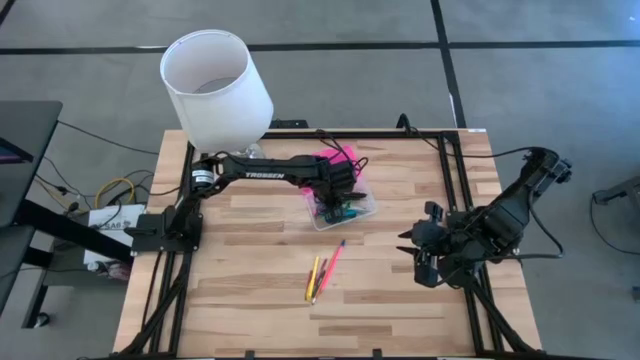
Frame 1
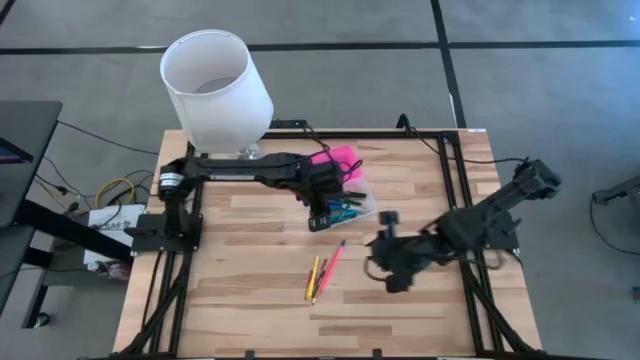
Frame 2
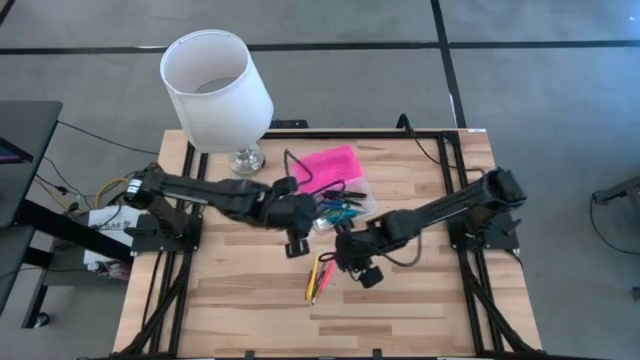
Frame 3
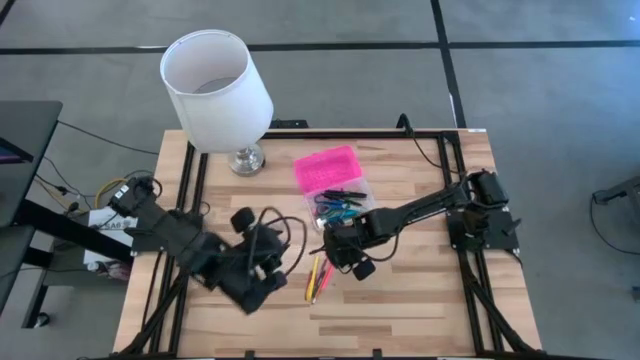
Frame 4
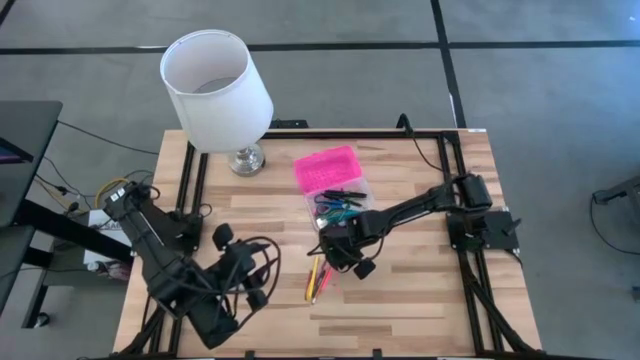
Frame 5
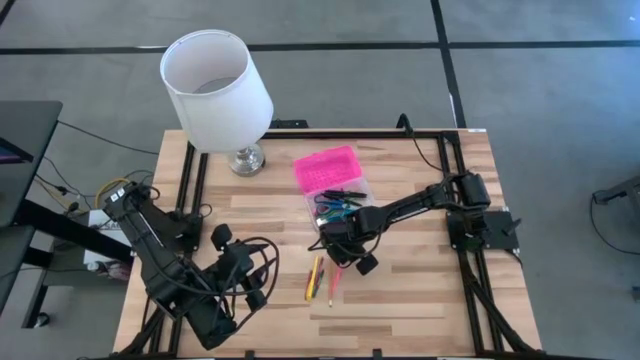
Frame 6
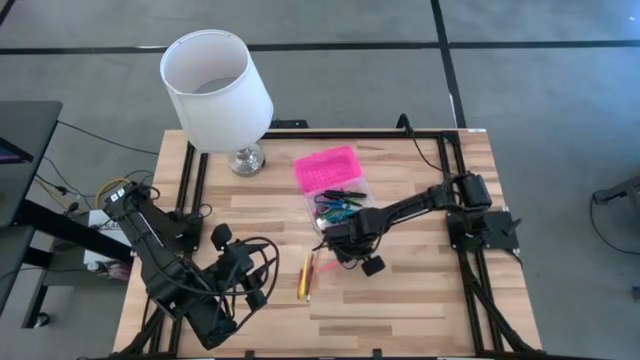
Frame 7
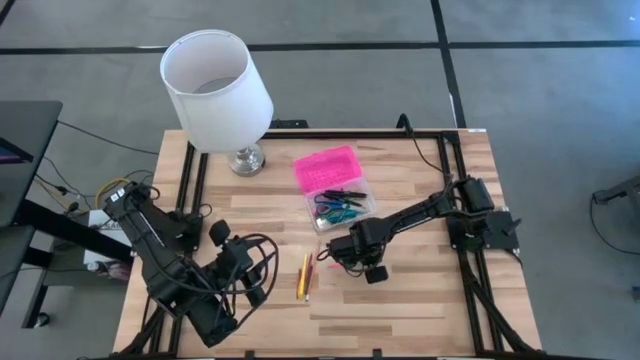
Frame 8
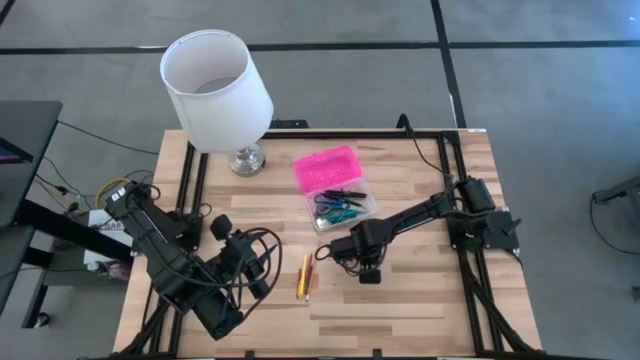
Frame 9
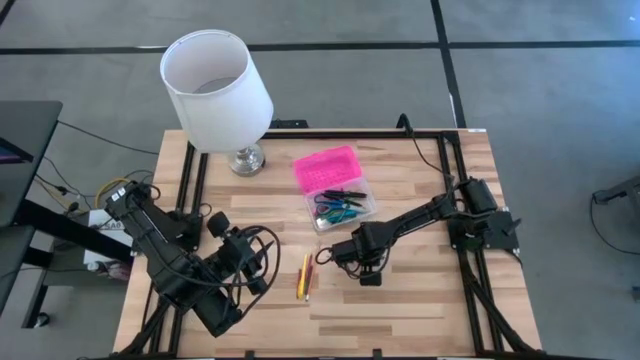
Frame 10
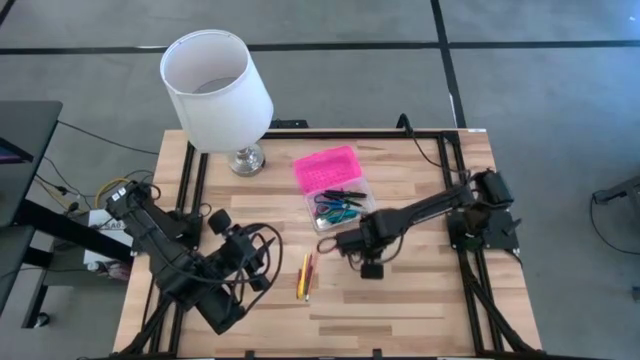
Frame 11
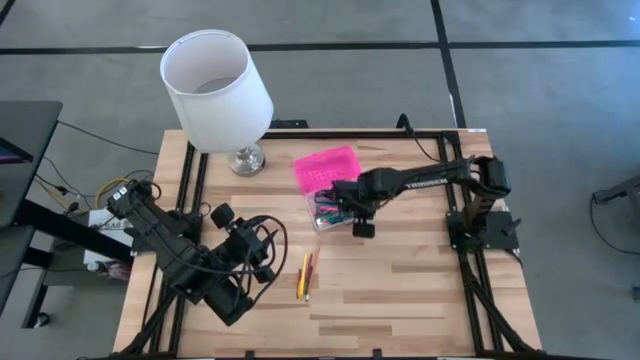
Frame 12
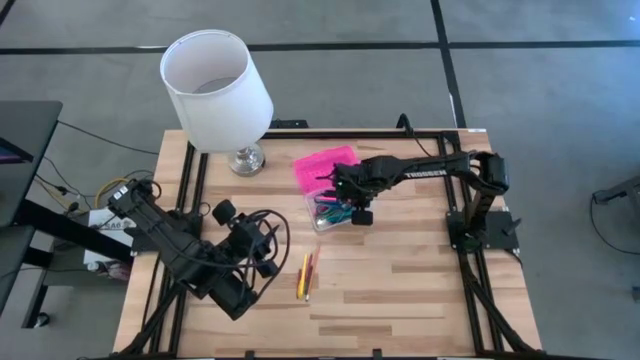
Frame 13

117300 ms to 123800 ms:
Task: Pick & place school supplies into a supply box
Put the pink pencil into the pink supply box

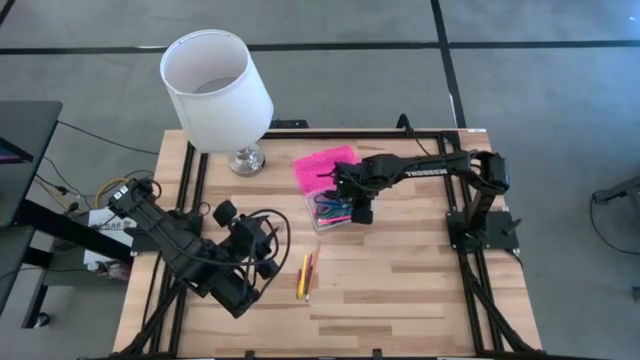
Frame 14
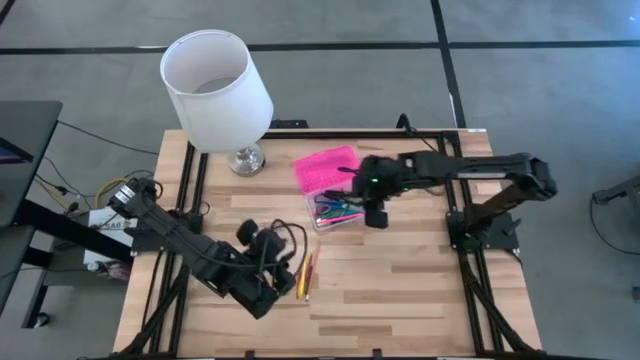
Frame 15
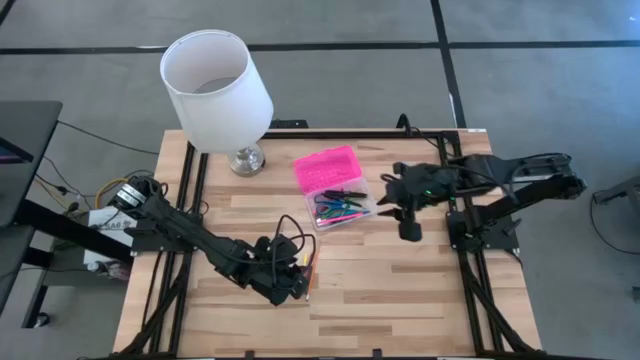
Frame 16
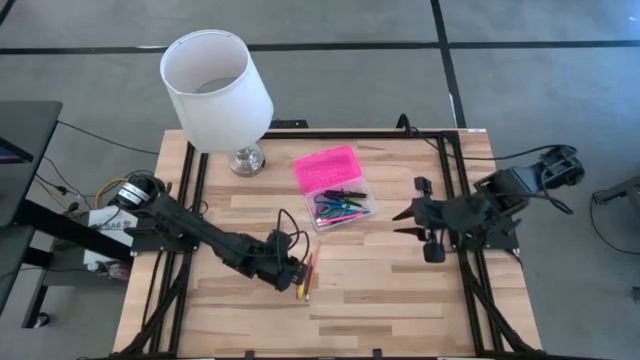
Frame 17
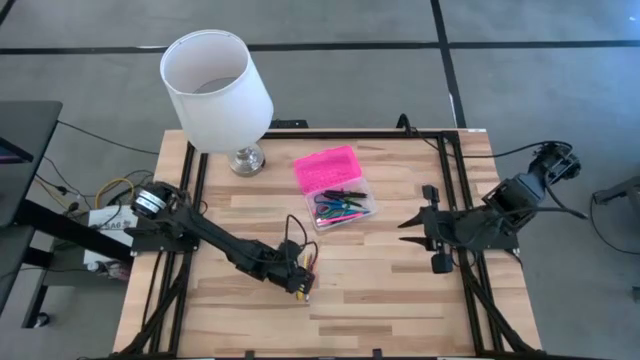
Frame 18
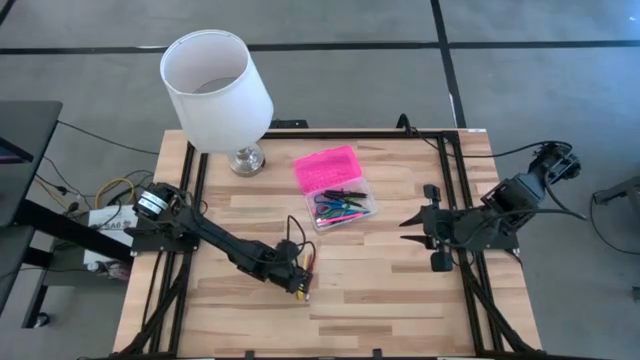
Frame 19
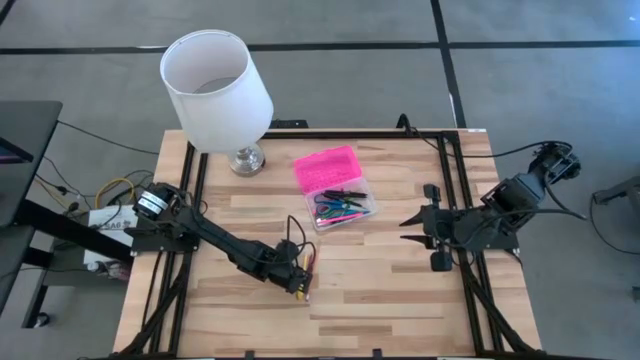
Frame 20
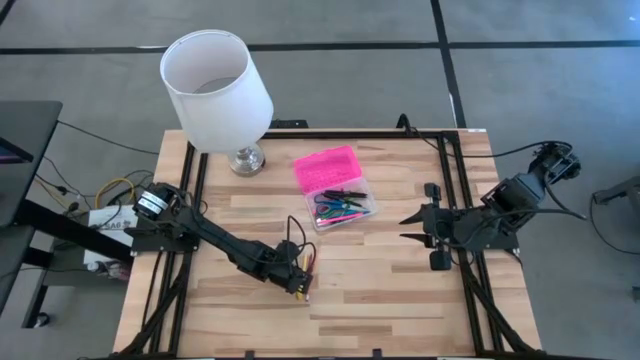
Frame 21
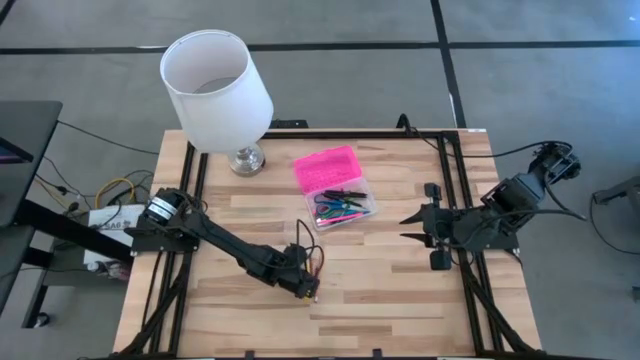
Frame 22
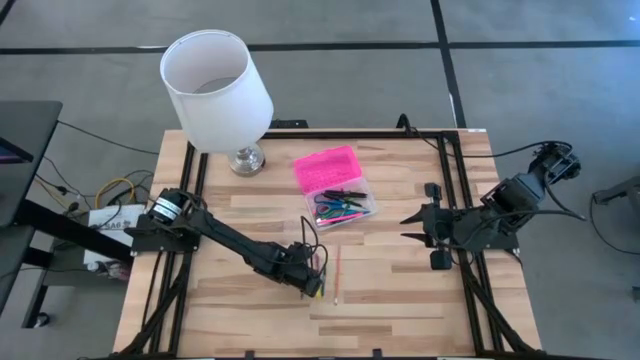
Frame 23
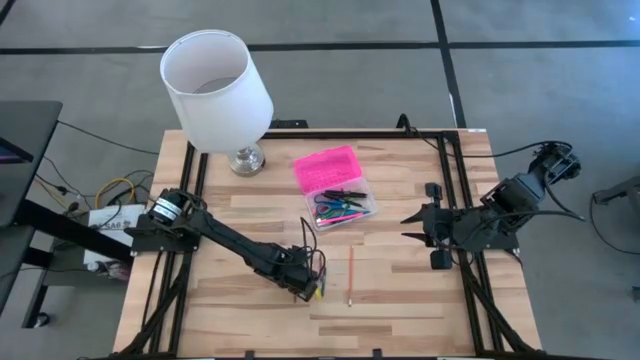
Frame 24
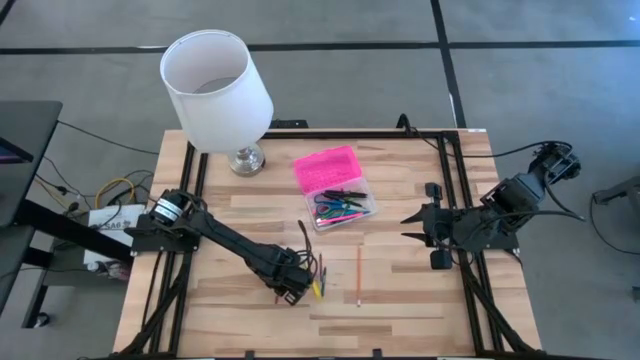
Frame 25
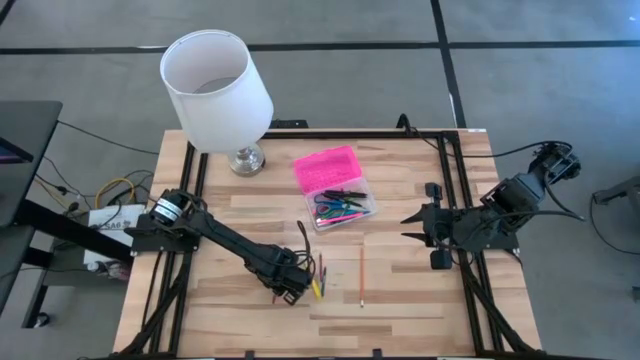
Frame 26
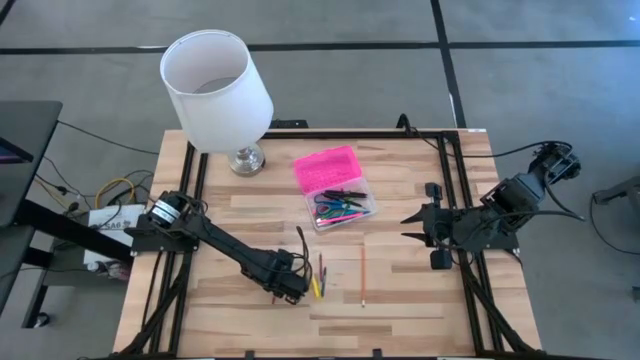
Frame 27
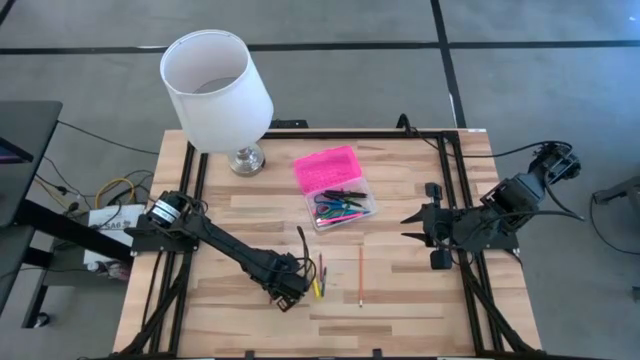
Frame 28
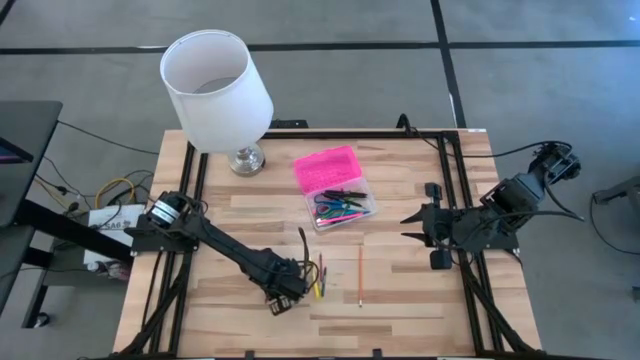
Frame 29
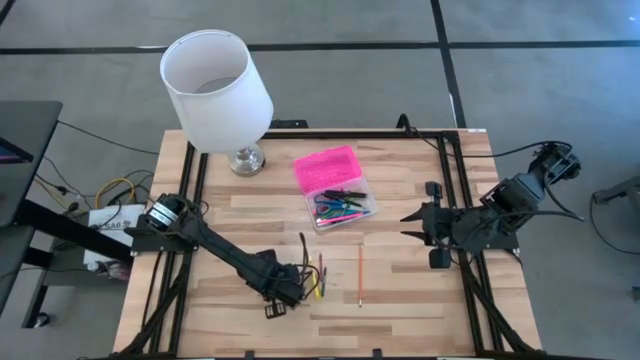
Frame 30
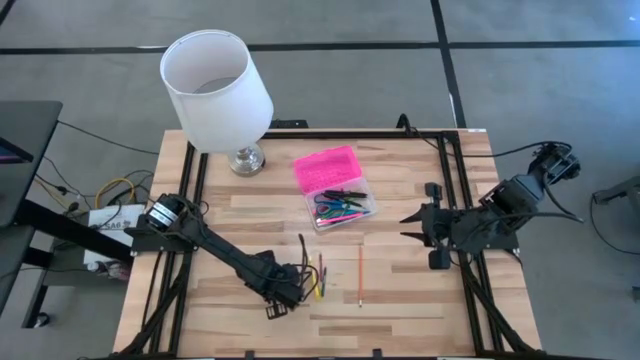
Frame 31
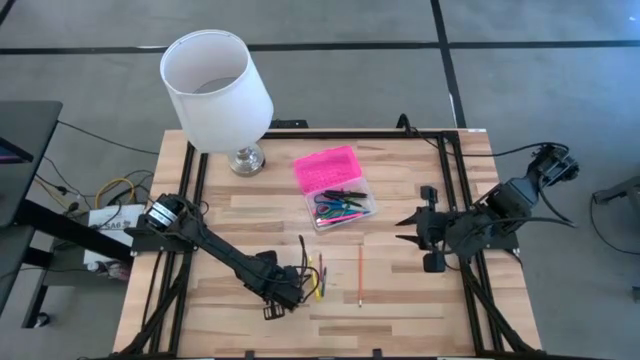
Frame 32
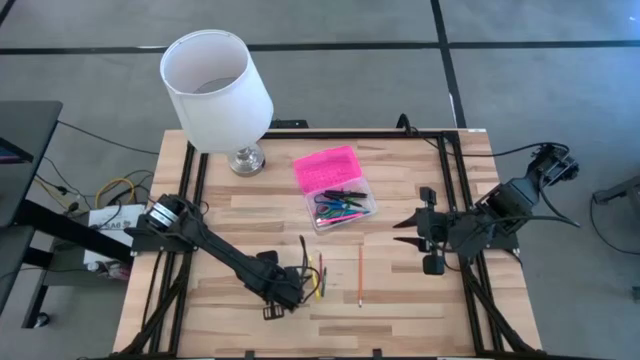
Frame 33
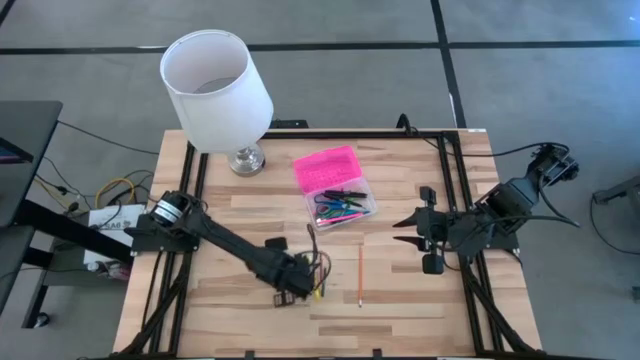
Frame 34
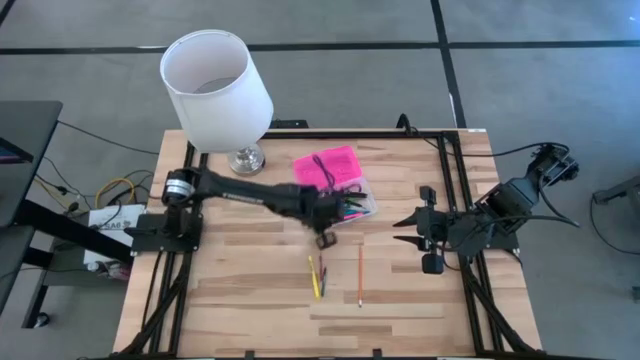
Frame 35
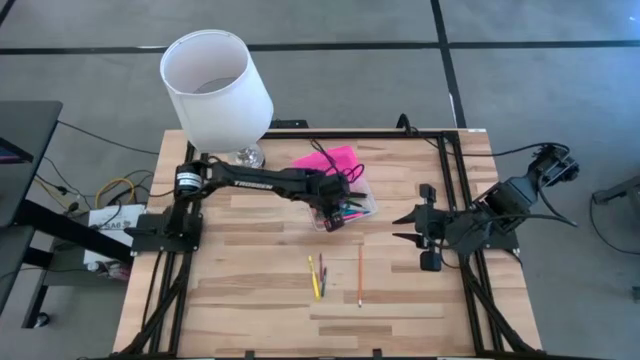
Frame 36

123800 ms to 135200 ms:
Put the left red crayon into the pink supply box

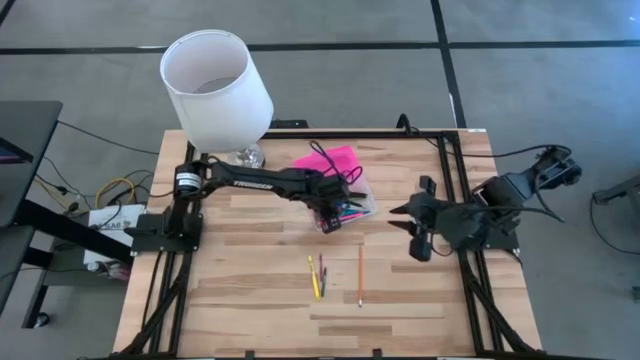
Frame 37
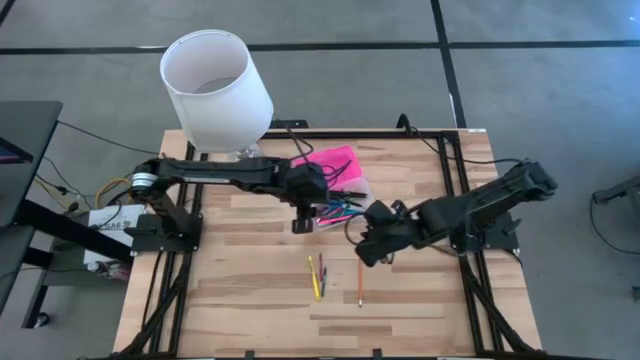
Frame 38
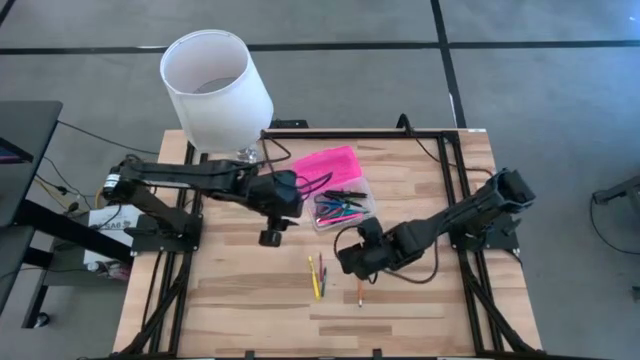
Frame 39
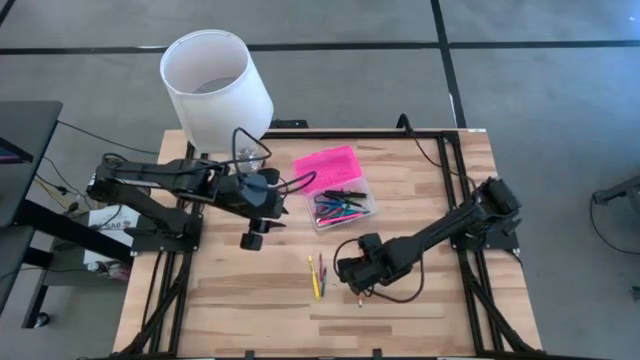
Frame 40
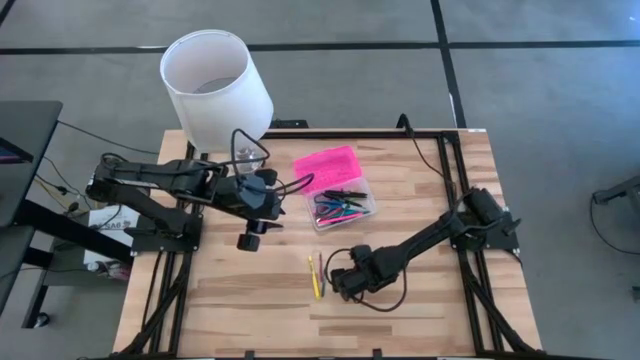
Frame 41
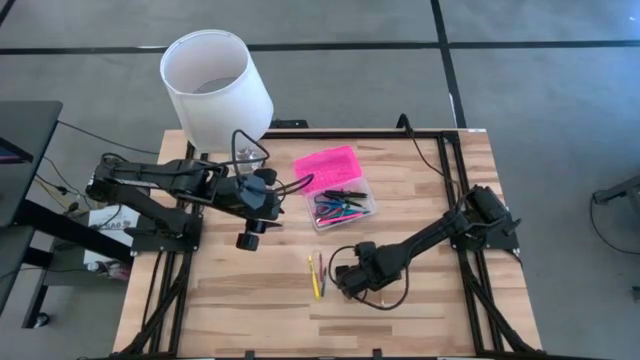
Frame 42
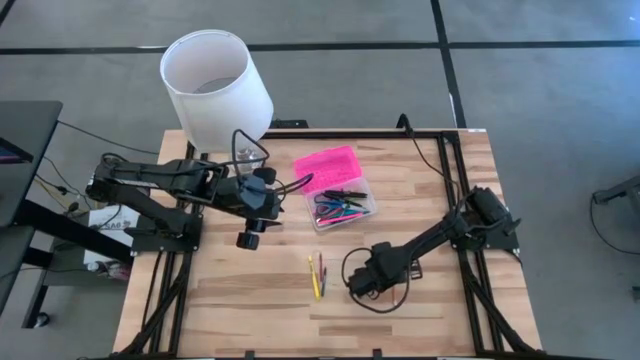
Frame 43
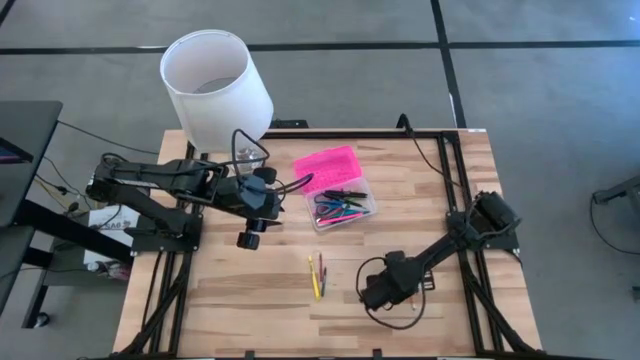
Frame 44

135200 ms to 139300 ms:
Put the yellow pencil into the pink supply box
